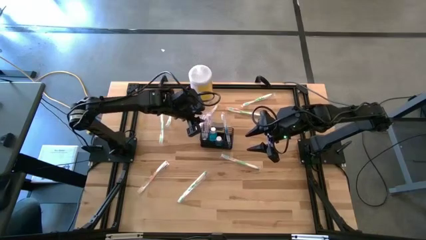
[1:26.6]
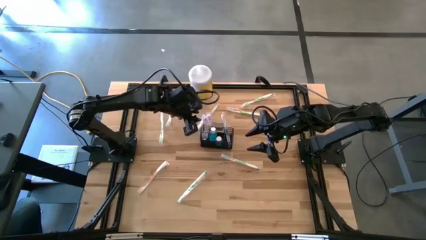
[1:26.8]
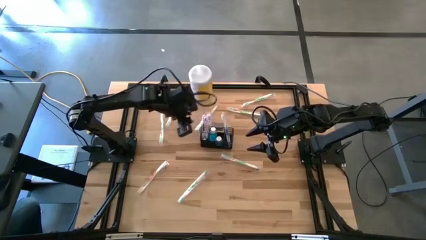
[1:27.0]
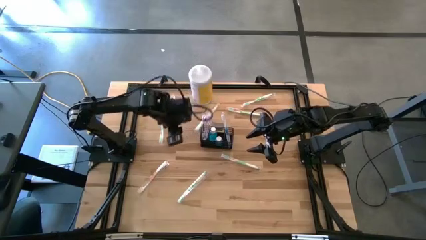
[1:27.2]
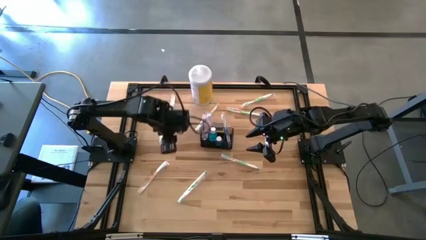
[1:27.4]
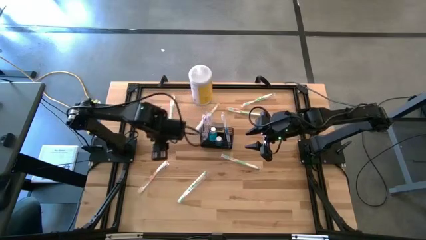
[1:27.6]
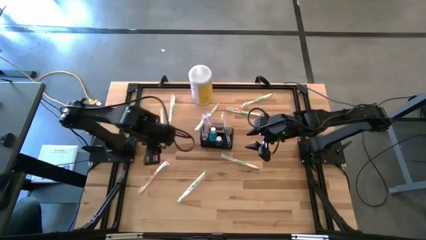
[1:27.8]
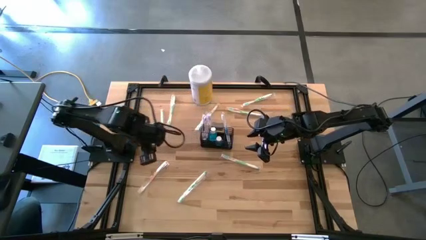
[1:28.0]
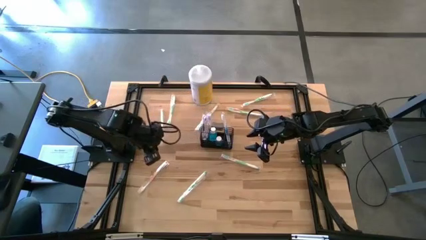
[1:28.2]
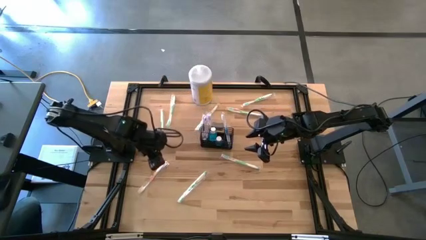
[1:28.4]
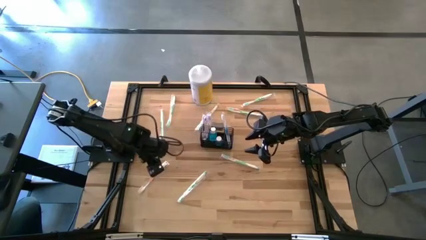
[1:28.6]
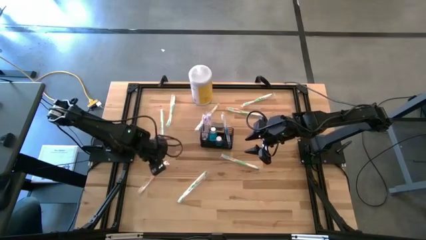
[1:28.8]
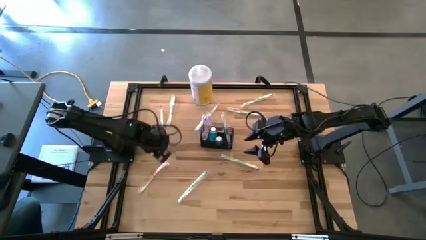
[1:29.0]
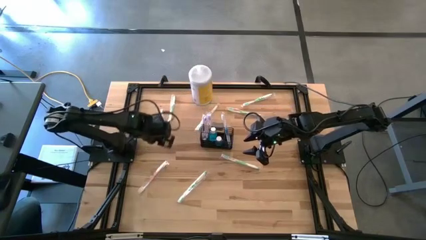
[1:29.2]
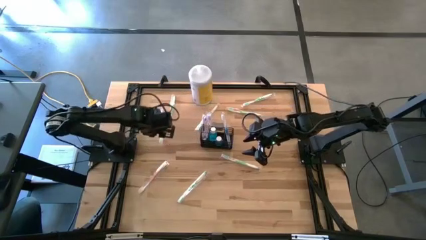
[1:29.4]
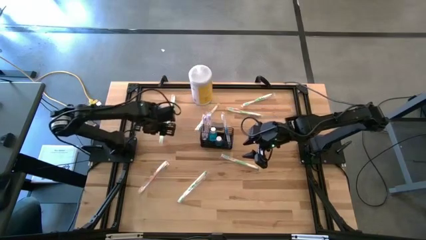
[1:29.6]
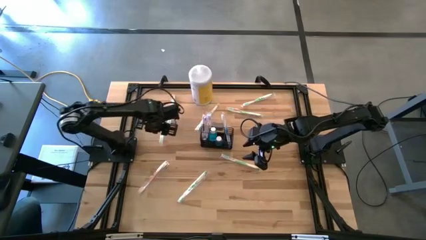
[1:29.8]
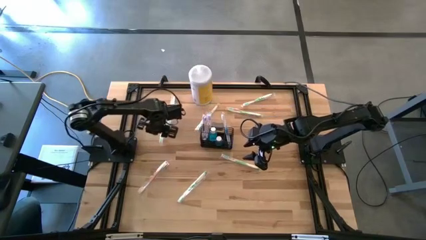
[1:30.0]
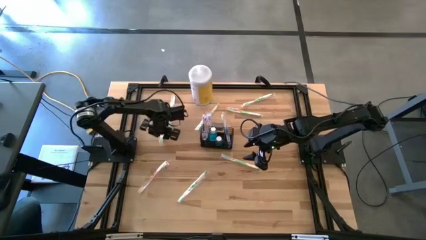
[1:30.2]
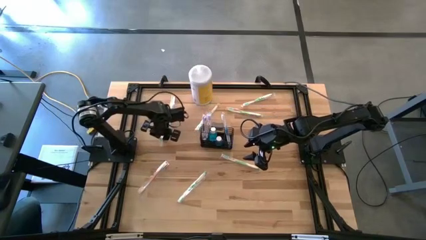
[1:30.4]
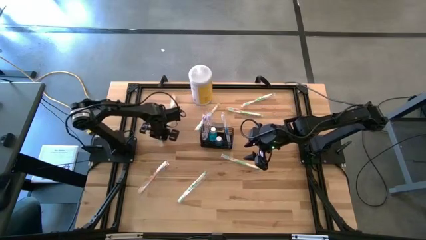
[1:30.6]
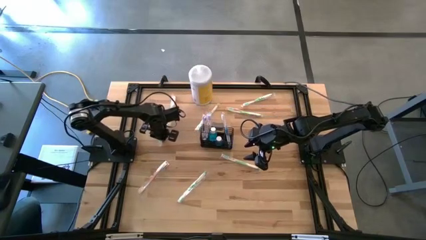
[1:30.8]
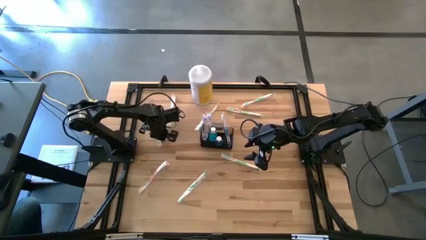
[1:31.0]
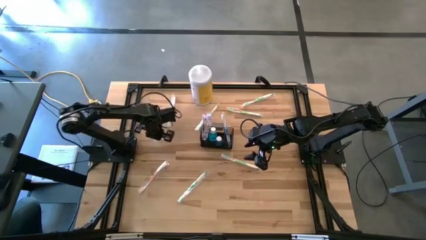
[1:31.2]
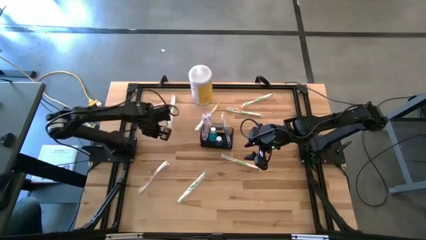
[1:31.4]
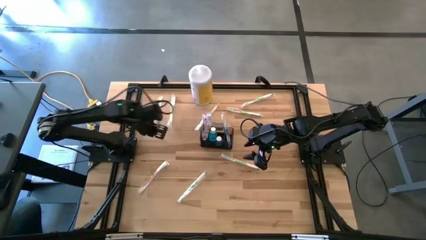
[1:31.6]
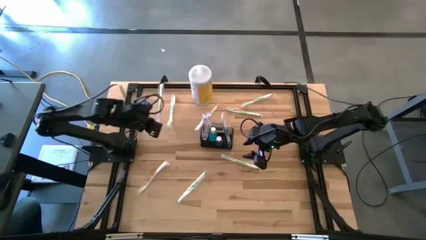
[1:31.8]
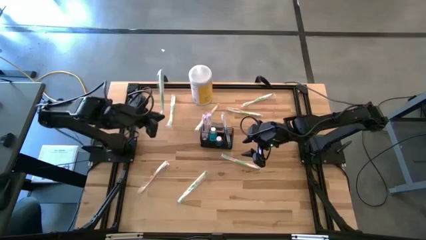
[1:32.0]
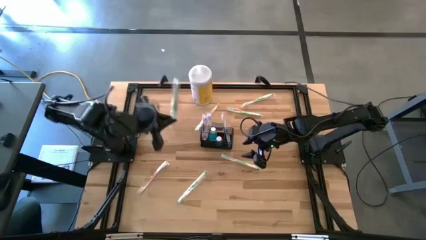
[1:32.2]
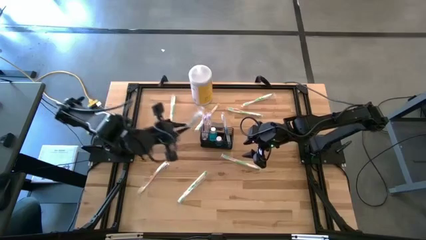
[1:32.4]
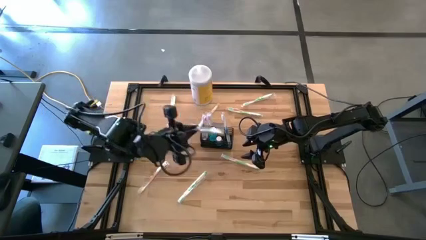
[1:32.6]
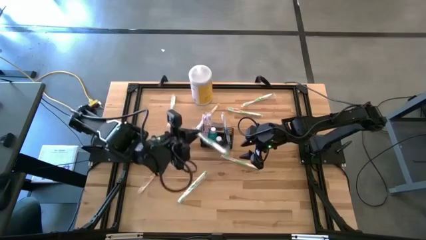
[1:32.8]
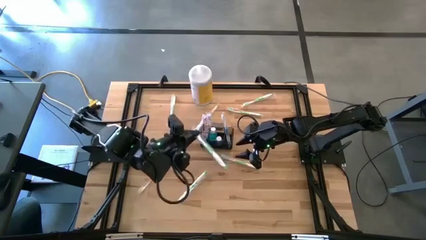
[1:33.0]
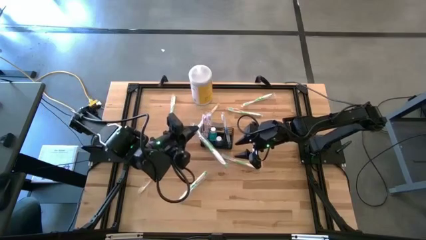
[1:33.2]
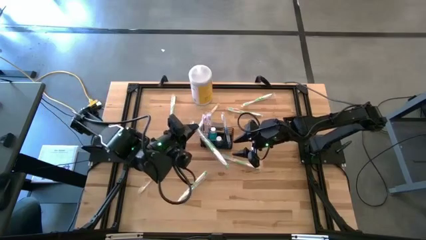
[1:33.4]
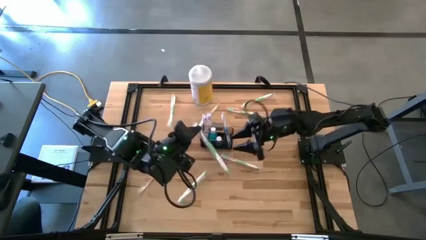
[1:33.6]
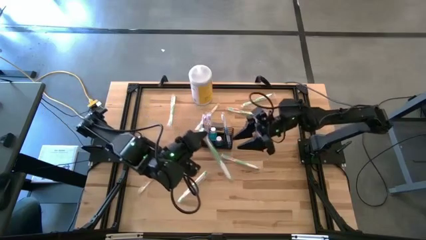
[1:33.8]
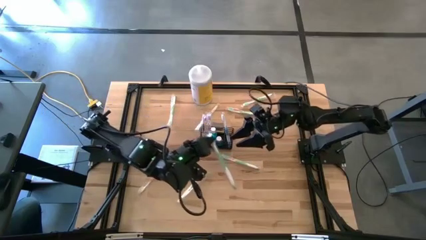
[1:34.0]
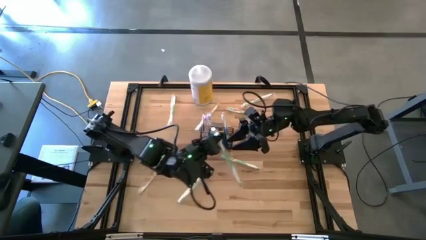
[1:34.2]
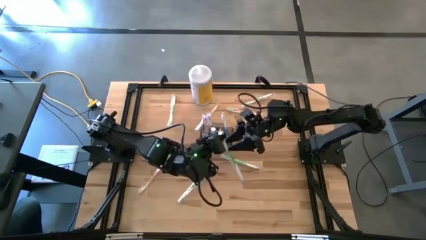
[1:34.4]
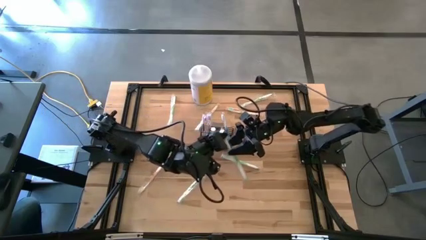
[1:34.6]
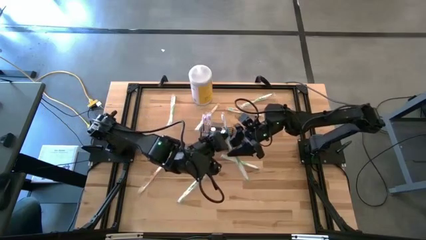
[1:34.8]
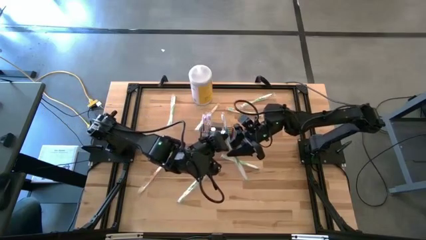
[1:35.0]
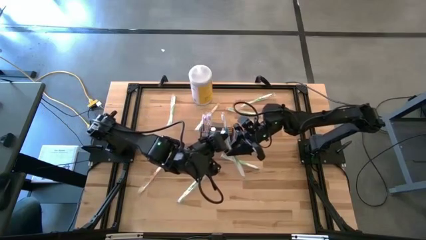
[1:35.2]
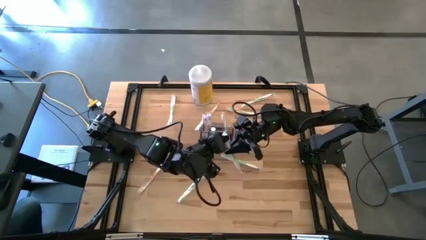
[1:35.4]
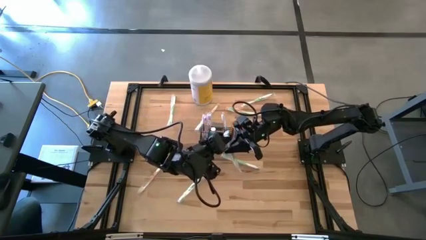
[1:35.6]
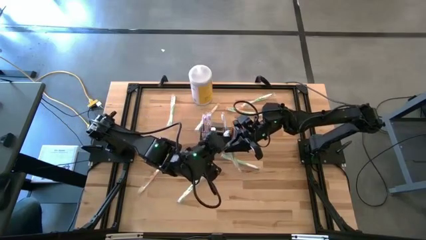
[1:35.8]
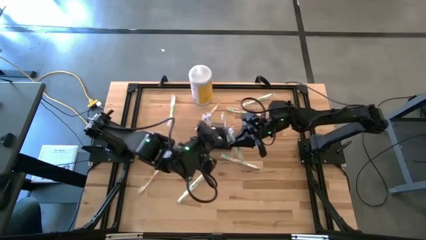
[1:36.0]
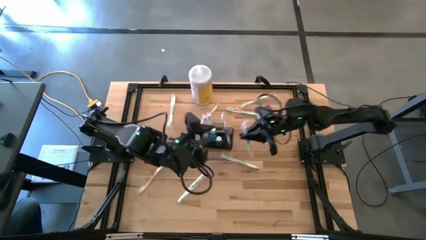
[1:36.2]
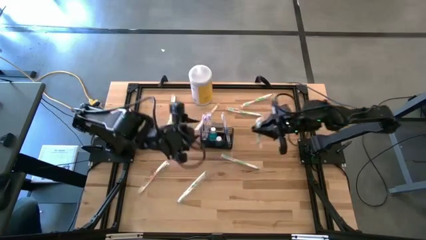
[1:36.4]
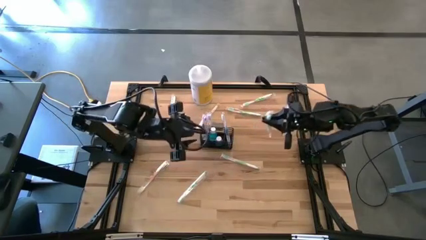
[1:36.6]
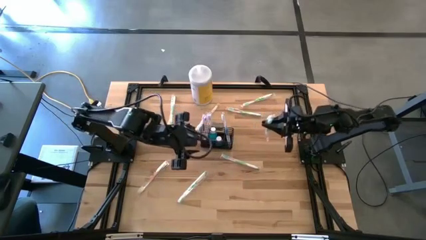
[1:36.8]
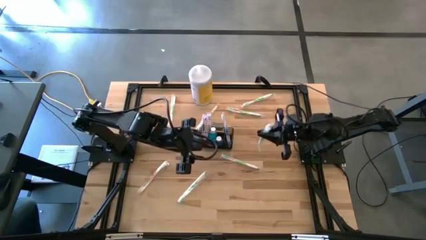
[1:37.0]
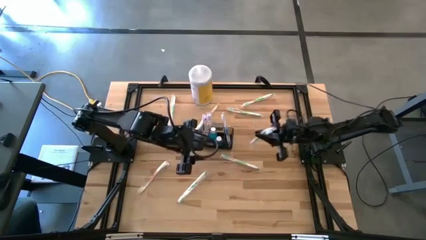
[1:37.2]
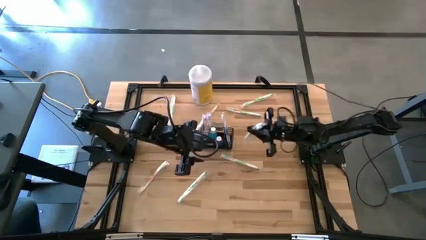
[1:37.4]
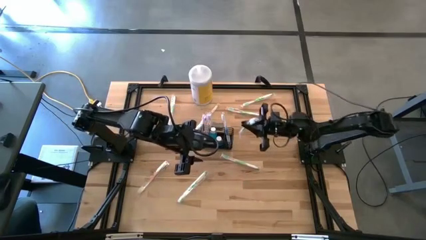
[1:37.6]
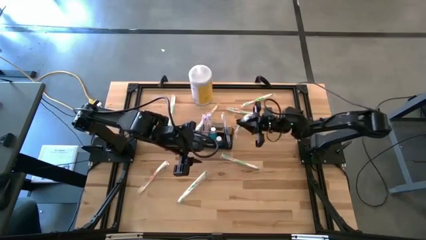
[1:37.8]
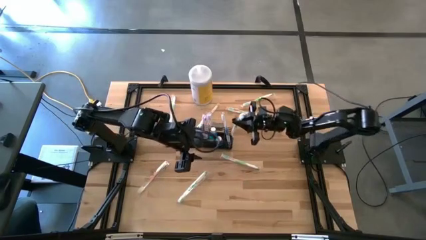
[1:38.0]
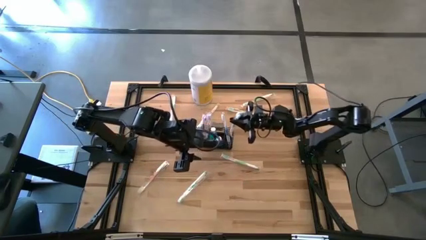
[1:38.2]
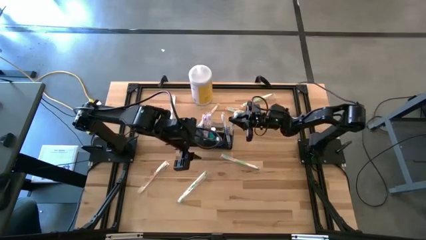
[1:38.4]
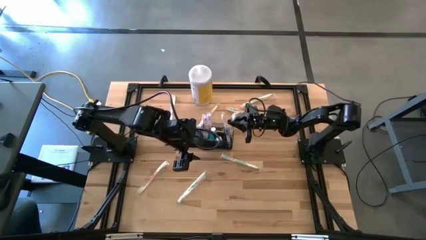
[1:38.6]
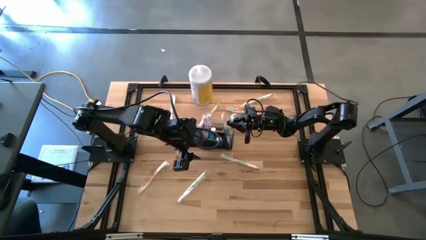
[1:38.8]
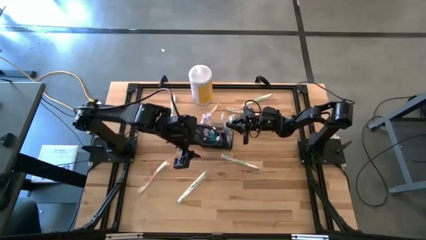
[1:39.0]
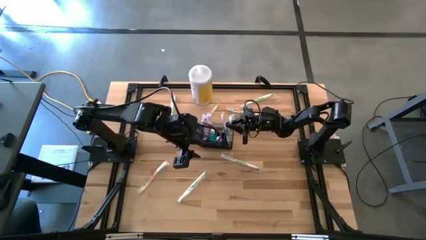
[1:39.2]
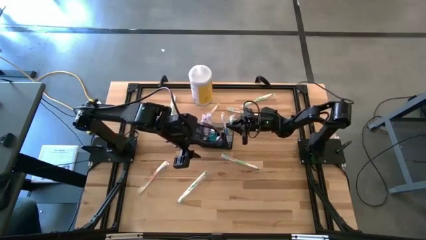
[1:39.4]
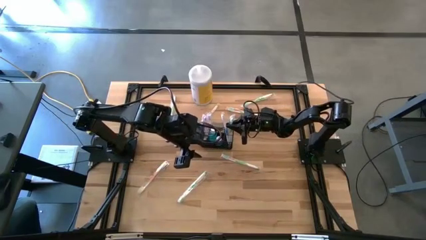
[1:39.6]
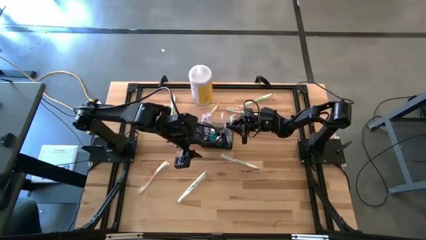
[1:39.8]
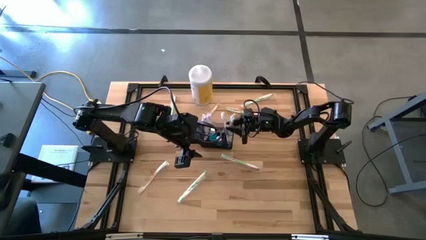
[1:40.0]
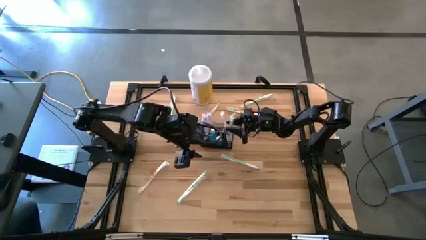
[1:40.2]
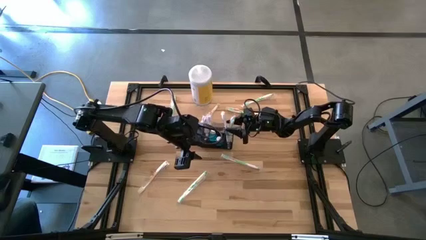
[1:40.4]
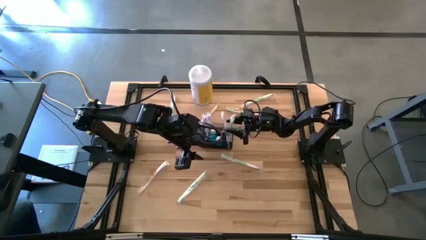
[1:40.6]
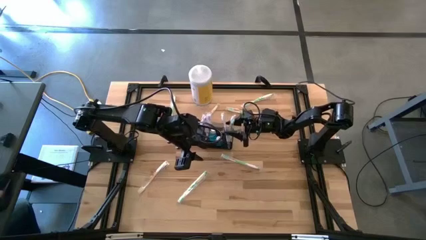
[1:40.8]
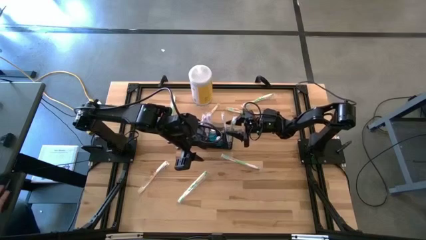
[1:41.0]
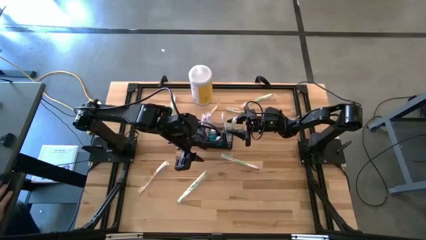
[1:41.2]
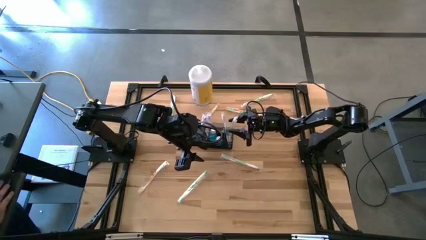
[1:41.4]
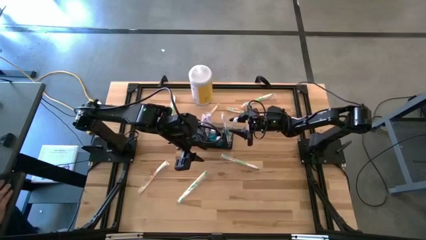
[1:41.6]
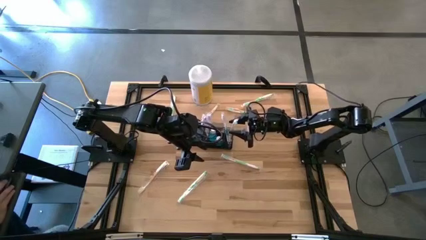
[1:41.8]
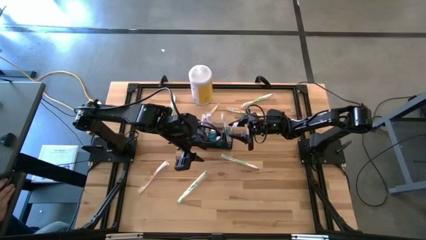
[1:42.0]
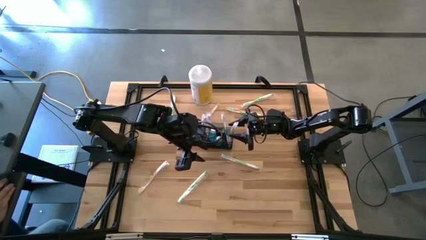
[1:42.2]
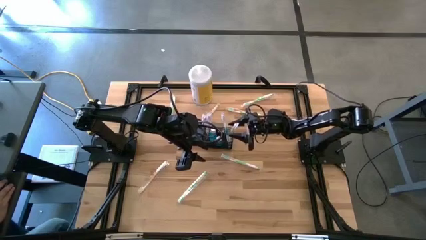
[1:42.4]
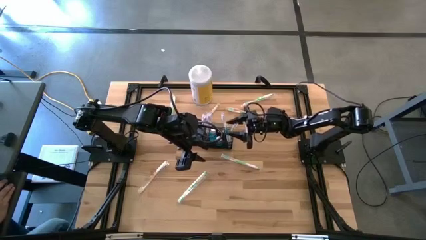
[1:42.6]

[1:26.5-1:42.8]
Task: Pick & Place toothbrushing station
Put the green toothbrush into the right section wire organizer

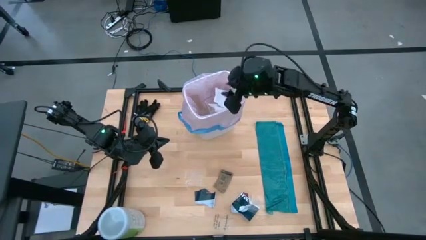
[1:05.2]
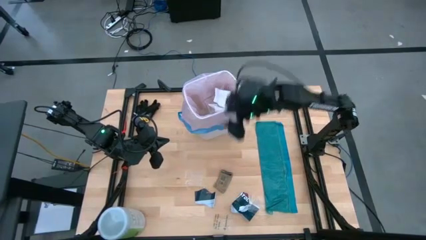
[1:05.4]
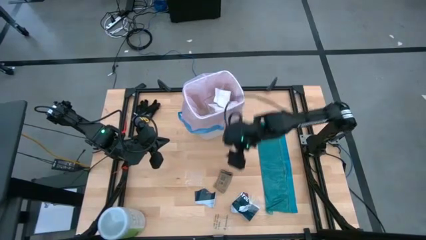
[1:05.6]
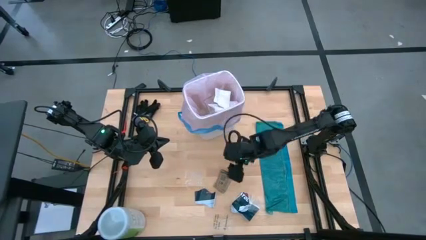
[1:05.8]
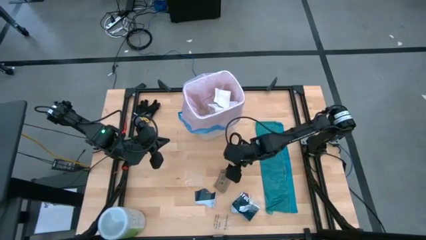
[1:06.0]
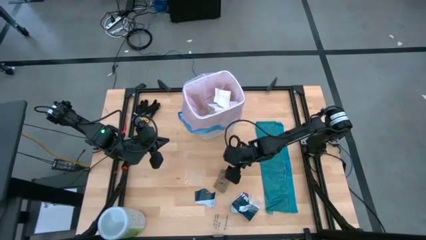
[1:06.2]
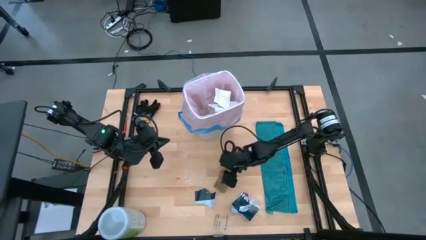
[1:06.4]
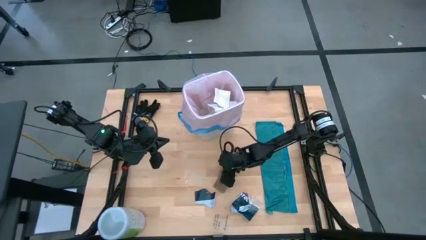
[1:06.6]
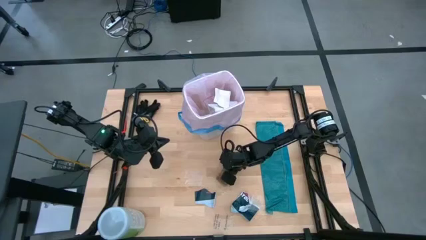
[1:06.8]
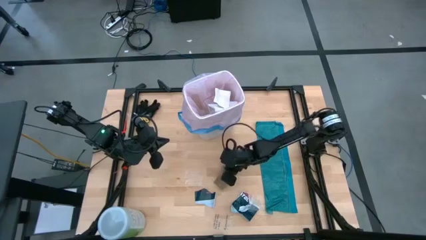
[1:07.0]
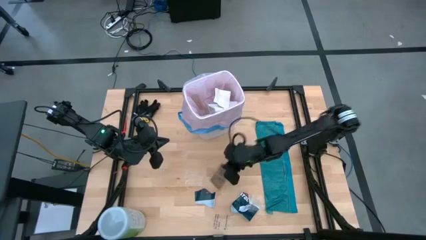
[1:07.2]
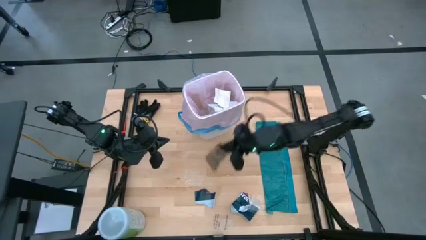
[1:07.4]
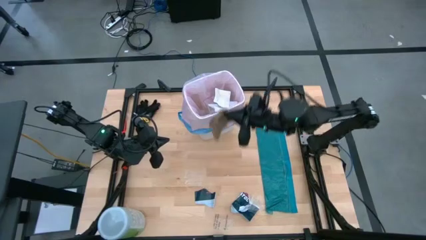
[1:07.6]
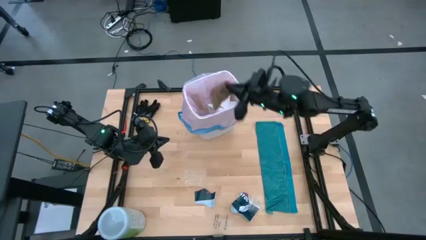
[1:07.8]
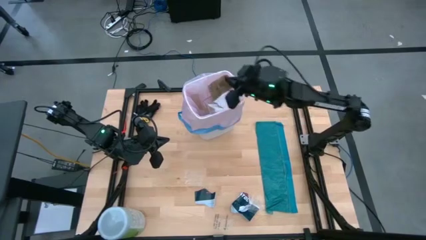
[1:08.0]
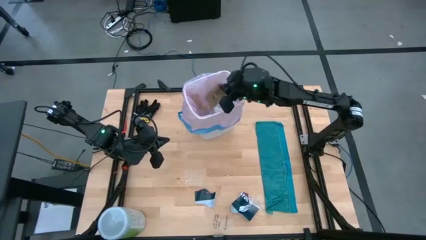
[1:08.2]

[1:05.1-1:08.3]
Task: place trash/remove bag and relplace
Put the brown paper into the white trash bin
